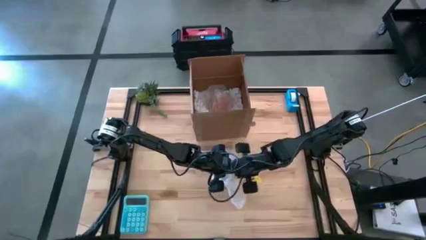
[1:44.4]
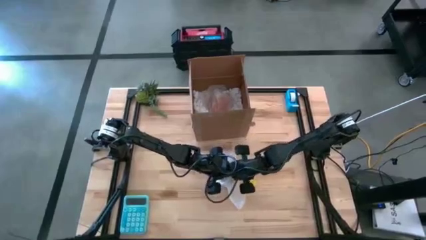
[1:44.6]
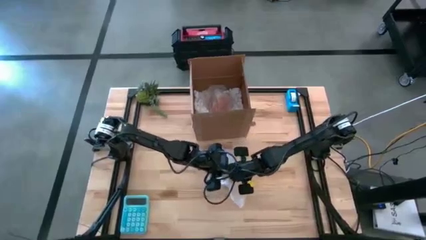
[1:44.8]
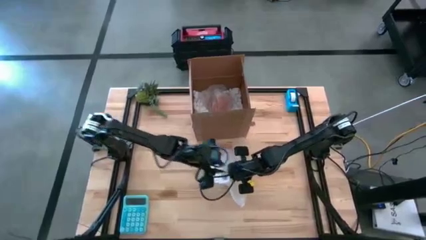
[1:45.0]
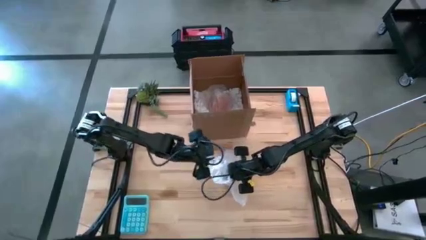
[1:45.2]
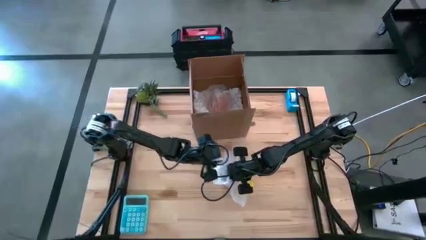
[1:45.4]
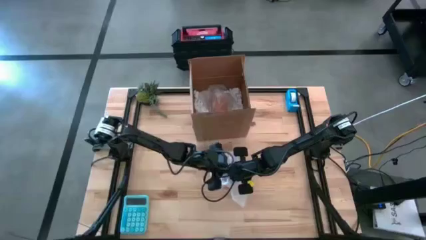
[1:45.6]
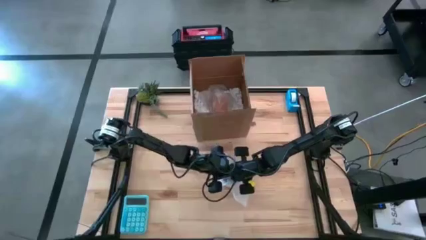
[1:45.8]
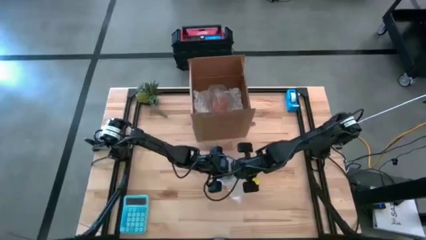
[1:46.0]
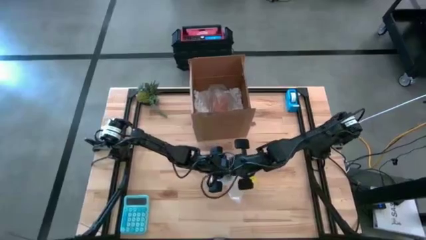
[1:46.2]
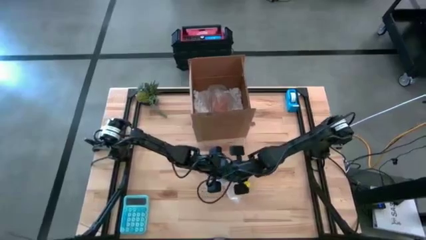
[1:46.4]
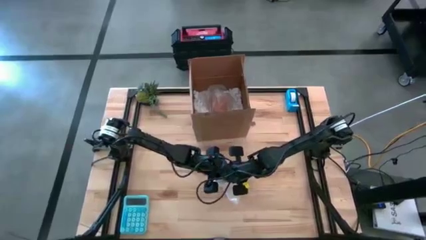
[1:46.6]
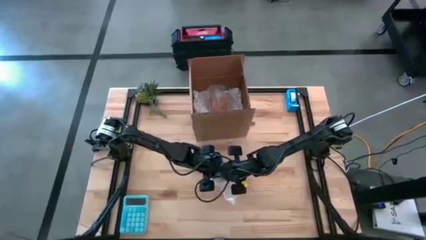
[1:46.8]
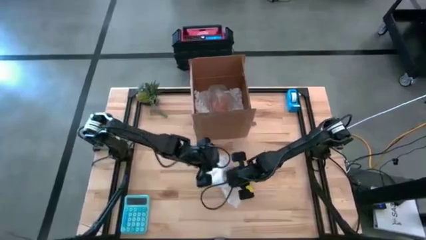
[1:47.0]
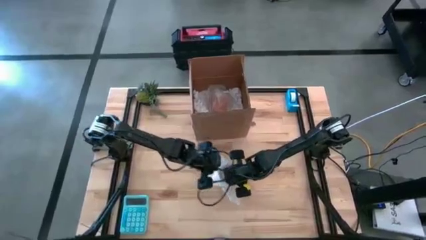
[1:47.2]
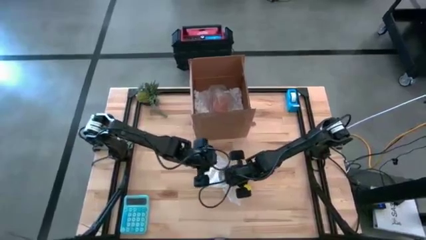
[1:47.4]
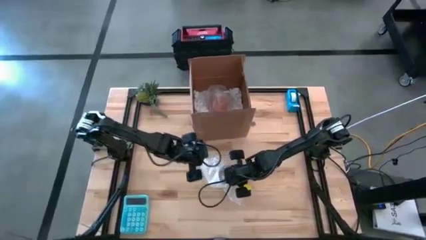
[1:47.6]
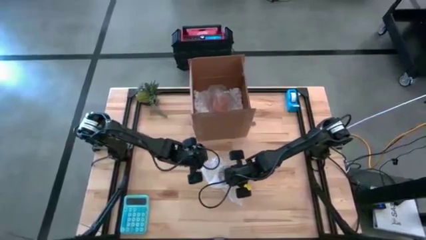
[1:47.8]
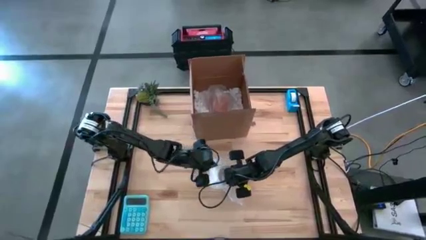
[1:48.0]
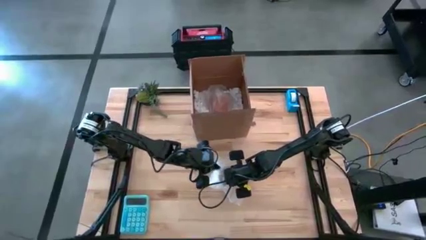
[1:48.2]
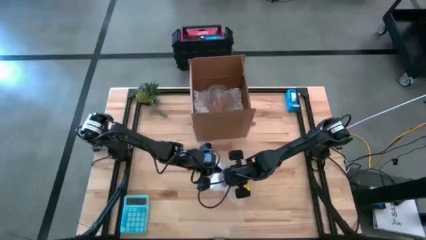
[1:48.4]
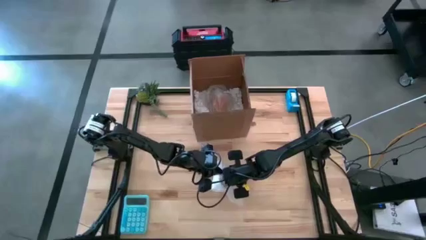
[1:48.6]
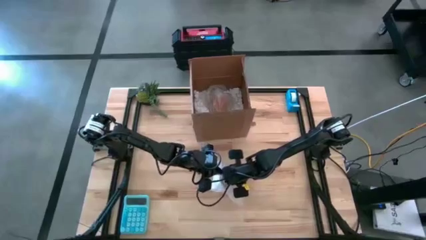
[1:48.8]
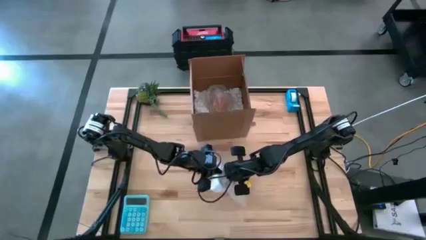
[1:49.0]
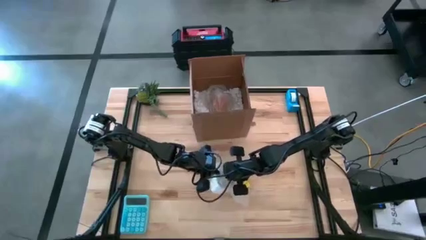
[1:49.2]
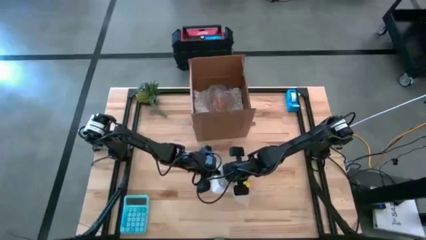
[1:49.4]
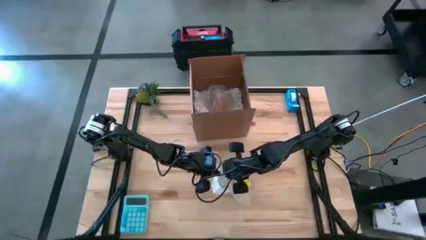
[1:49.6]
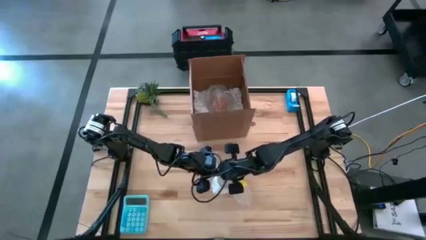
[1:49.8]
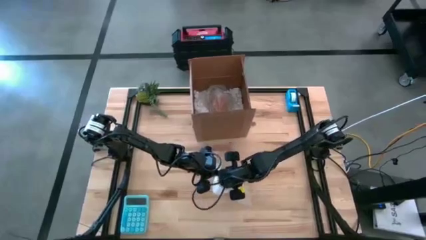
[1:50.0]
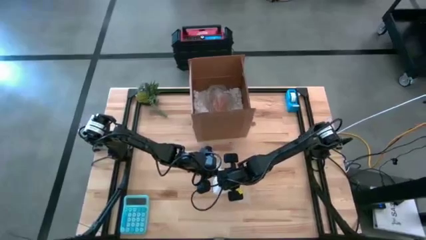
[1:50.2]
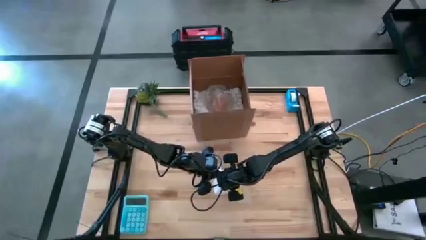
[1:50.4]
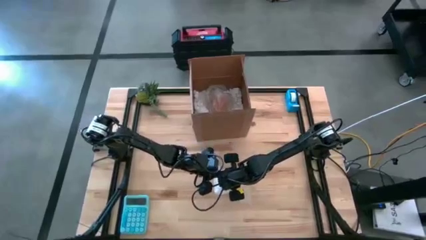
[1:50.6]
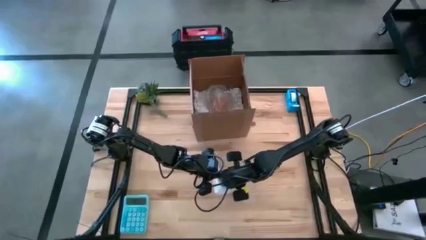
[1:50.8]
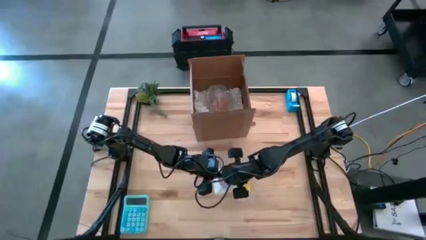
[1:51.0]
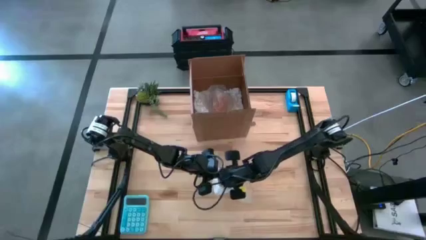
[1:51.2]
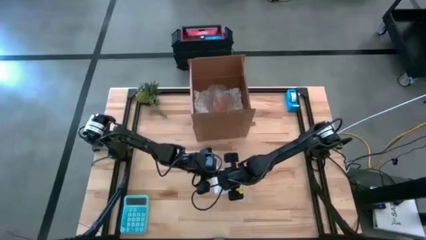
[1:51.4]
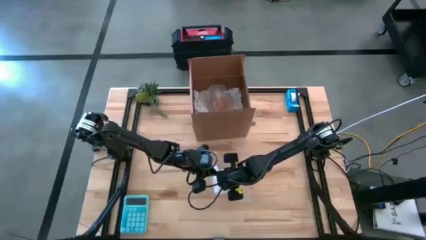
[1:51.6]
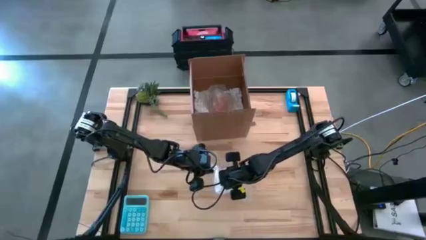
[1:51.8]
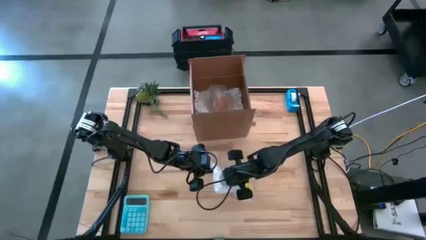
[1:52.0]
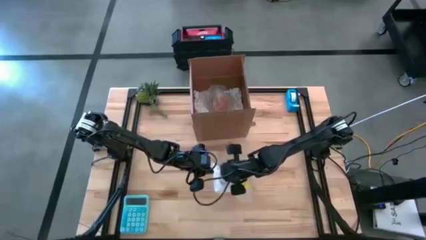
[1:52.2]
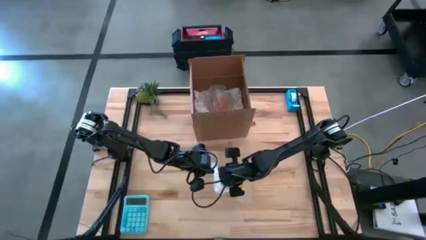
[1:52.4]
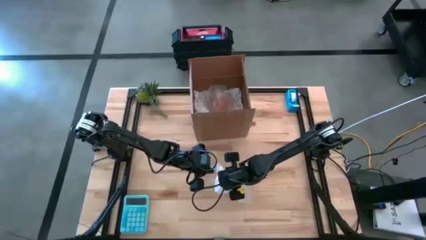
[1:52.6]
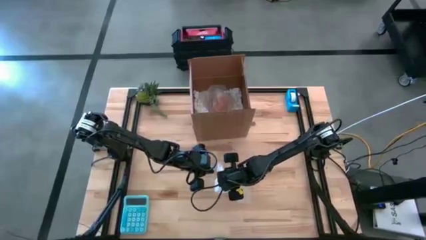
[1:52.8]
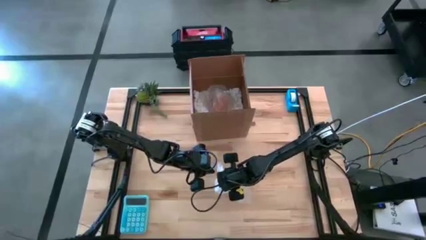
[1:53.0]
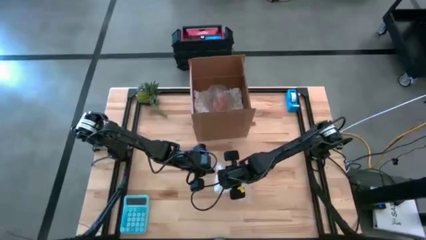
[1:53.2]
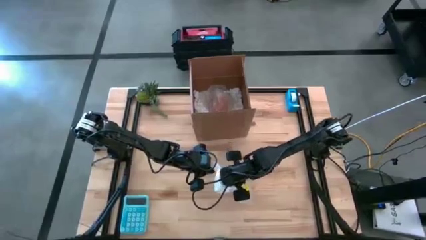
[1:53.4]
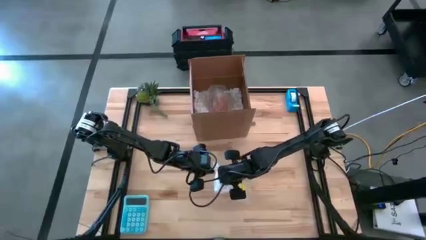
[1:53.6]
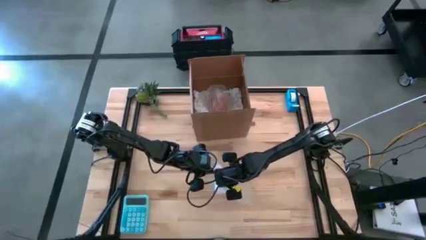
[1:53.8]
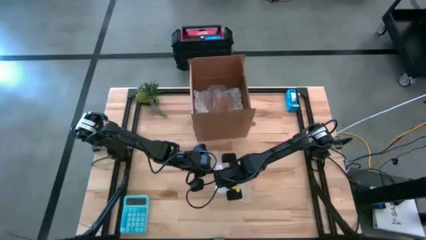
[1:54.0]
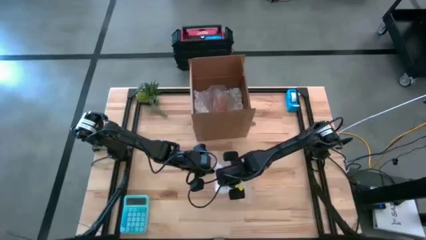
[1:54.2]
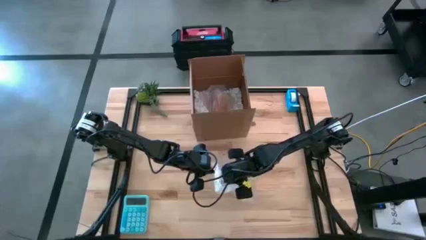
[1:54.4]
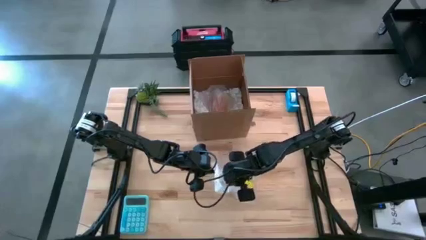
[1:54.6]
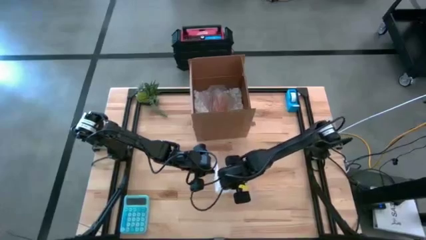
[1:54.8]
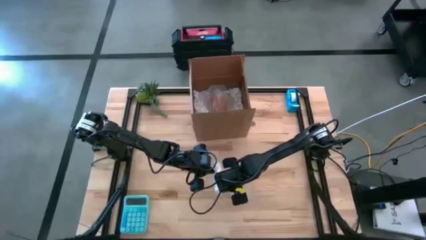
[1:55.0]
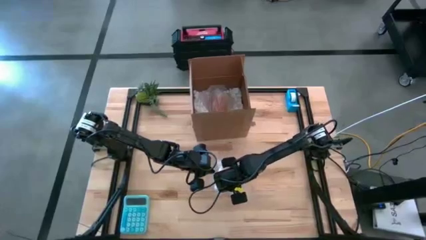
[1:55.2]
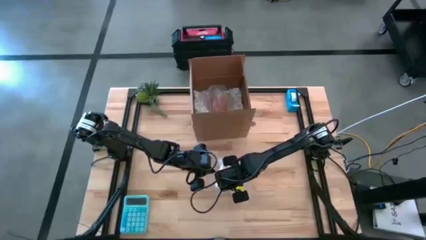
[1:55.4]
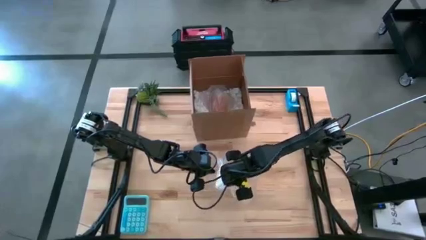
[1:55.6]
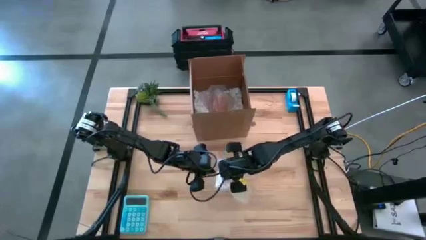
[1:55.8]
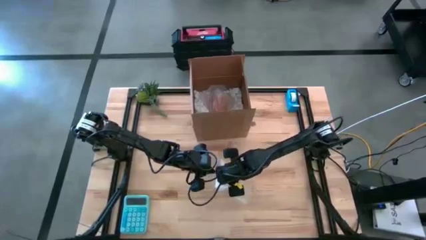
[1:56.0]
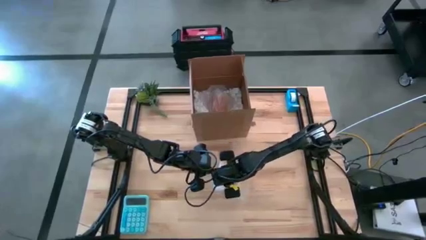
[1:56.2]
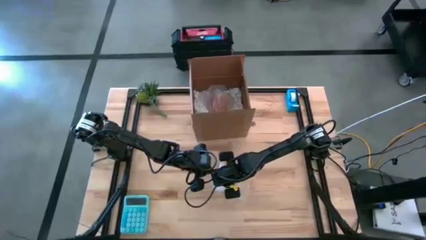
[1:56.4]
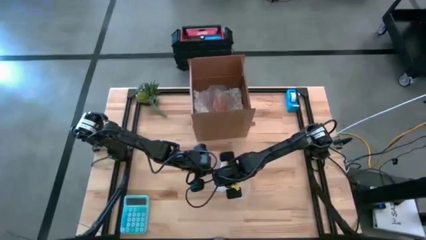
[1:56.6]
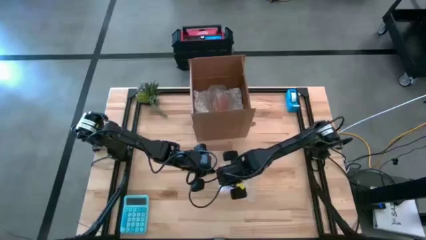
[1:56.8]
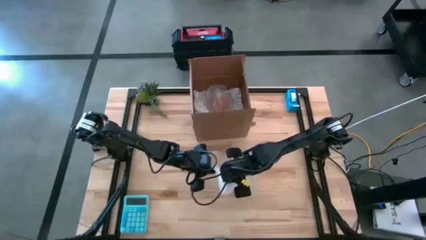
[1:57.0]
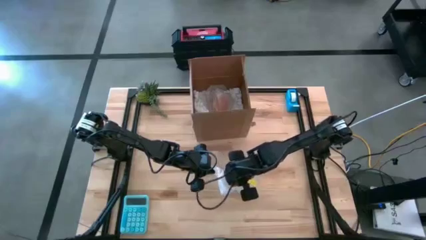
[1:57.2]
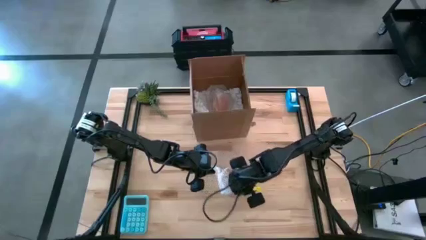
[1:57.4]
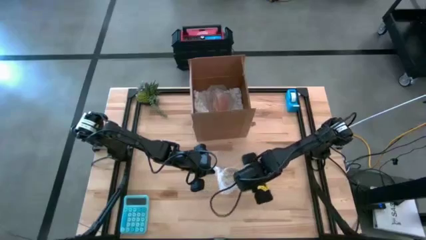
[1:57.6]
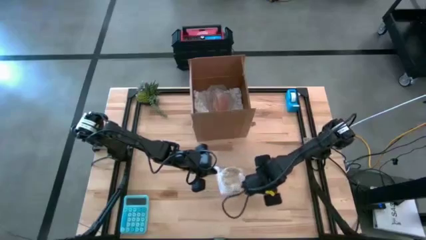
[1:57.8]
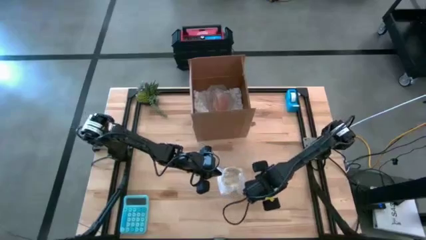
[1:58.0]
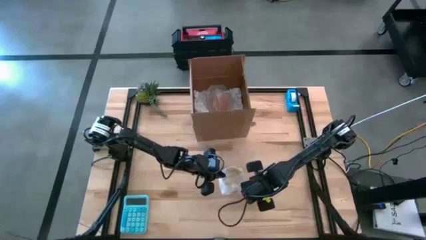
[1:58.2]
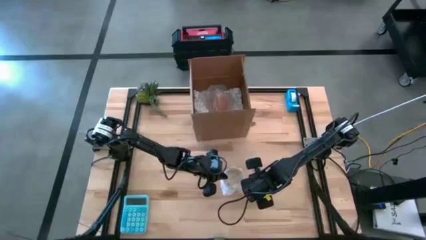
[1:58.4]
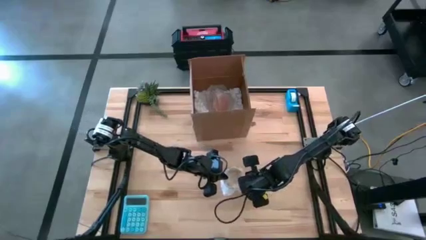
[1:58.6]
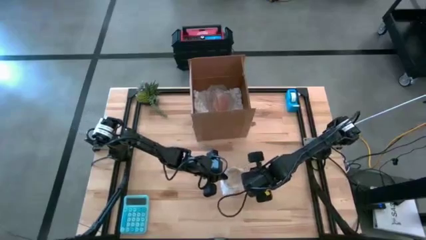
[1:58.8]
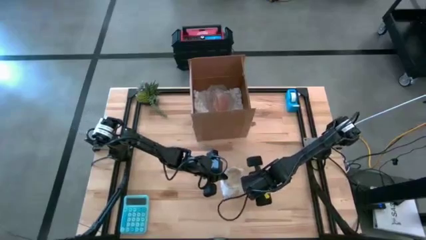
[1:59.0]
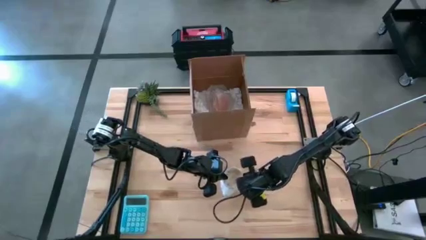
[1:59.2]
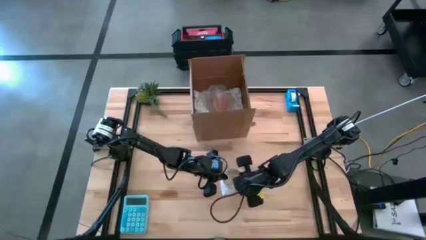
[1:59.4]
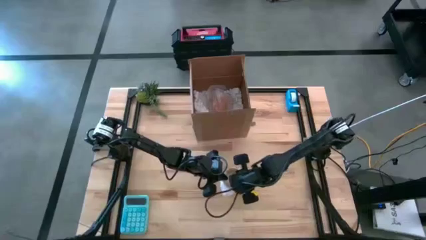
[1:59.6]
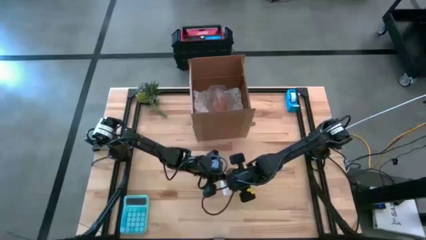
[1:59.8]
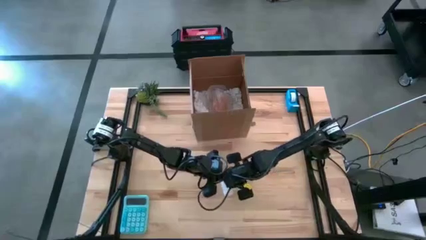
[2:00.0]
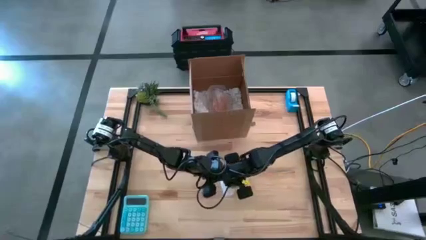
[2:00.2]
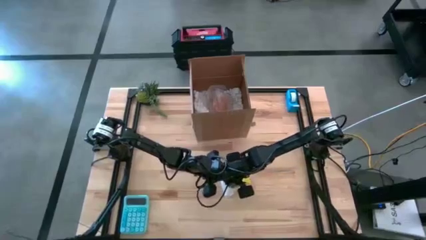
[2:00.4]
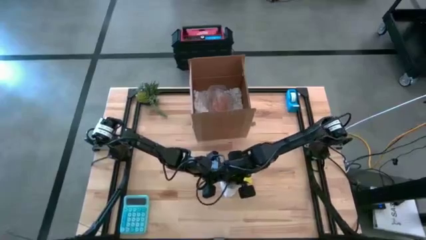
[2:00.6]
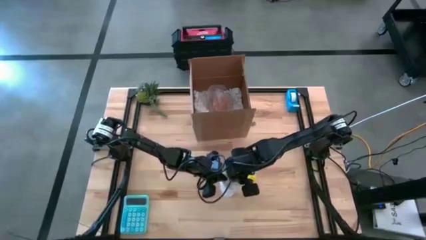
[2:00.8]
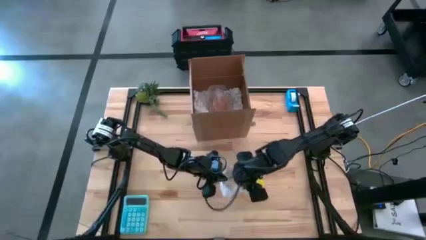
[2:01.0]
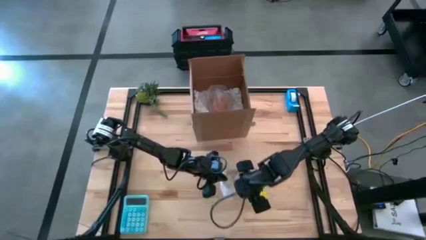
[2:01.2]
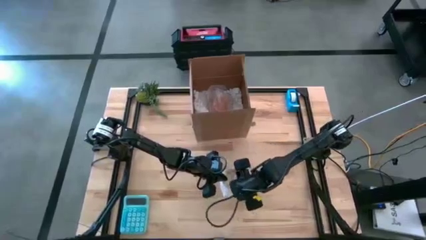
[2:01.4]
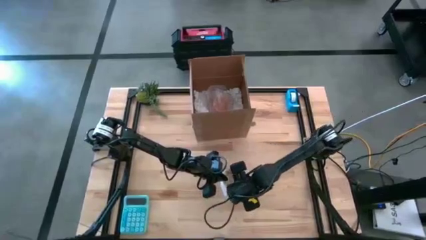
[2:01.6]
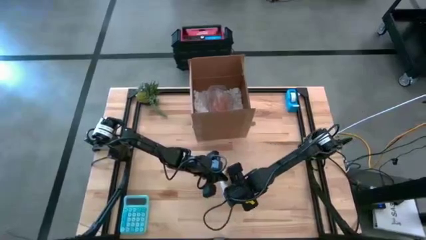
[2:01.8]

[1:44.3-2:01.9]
Task: wrap mug
Wrap the yellow mug with bubble wrap
